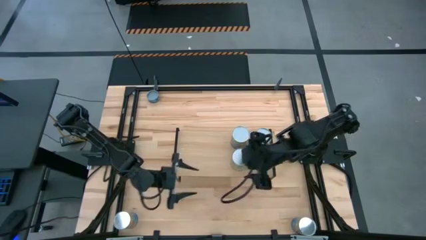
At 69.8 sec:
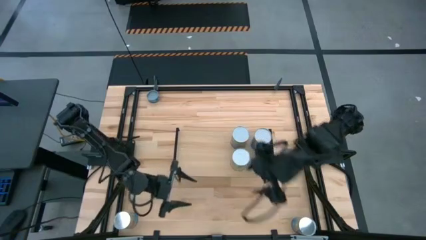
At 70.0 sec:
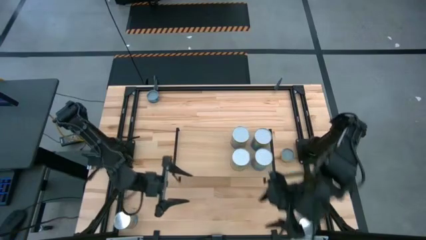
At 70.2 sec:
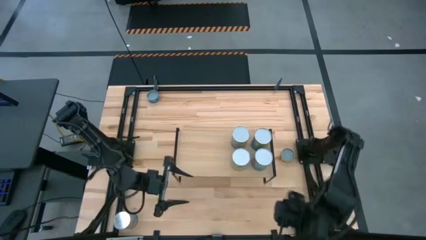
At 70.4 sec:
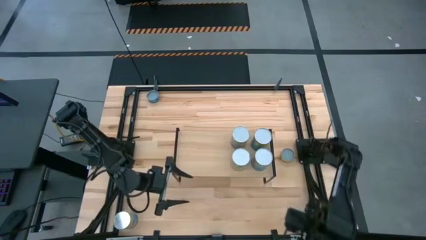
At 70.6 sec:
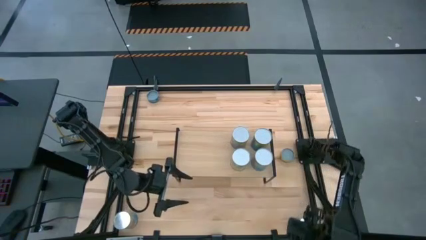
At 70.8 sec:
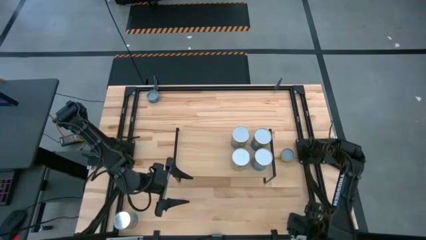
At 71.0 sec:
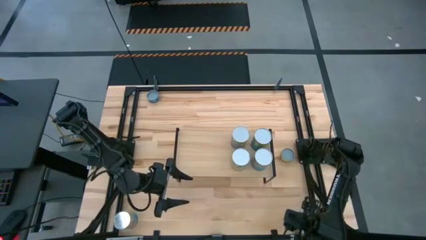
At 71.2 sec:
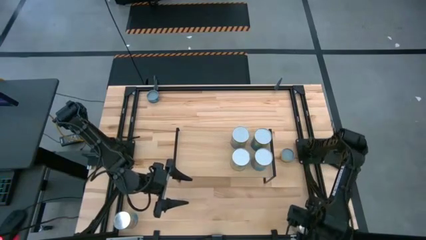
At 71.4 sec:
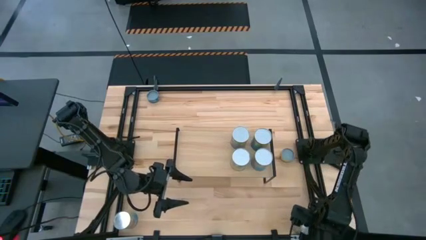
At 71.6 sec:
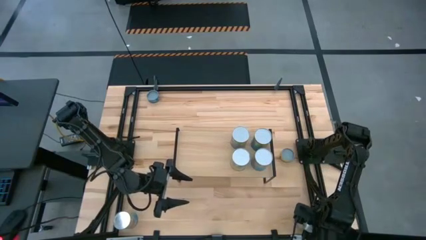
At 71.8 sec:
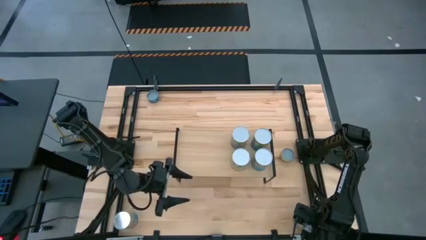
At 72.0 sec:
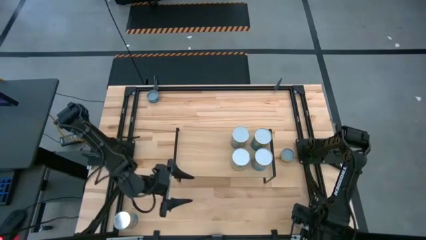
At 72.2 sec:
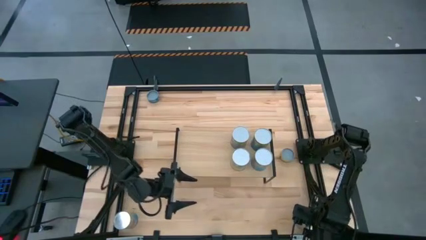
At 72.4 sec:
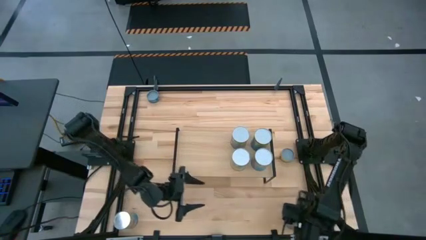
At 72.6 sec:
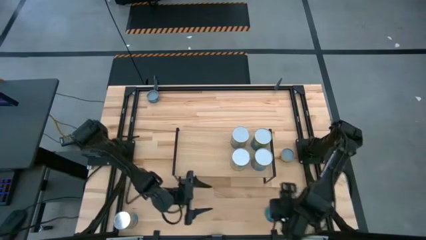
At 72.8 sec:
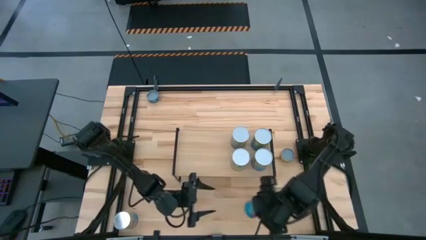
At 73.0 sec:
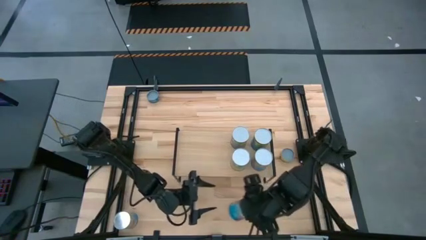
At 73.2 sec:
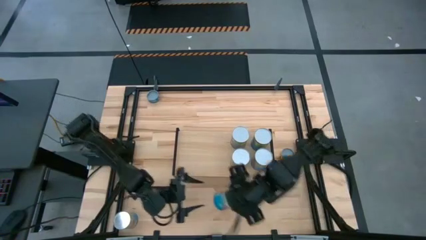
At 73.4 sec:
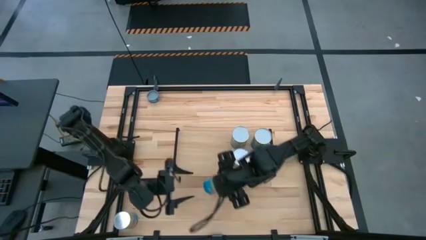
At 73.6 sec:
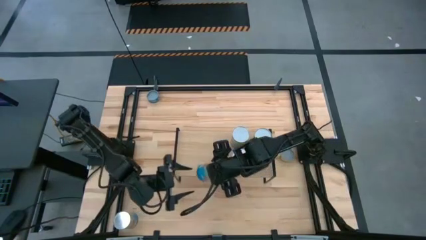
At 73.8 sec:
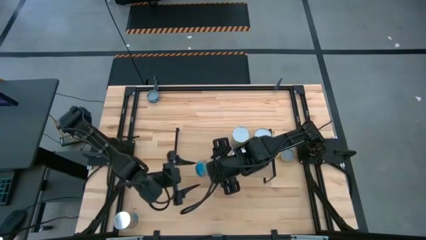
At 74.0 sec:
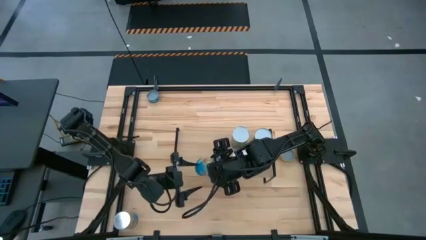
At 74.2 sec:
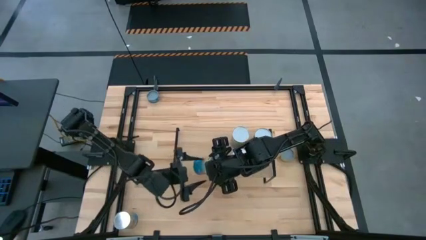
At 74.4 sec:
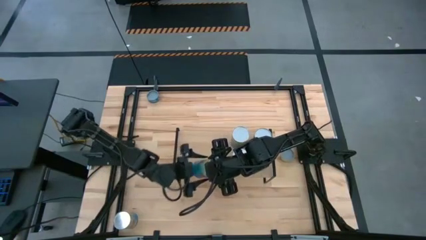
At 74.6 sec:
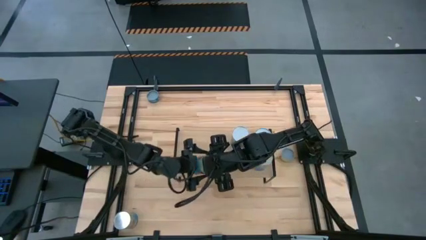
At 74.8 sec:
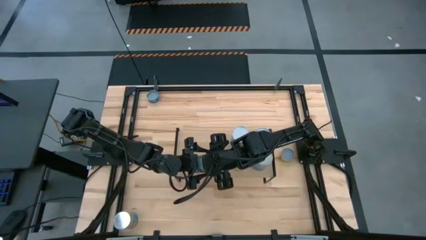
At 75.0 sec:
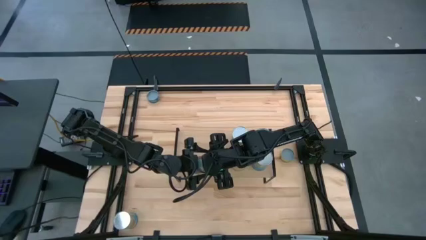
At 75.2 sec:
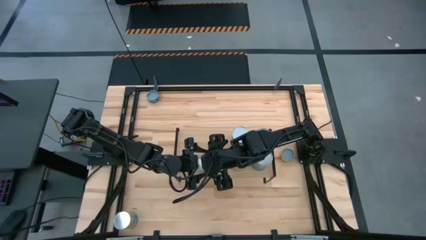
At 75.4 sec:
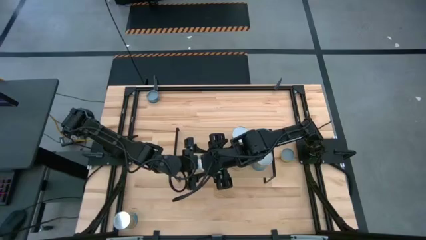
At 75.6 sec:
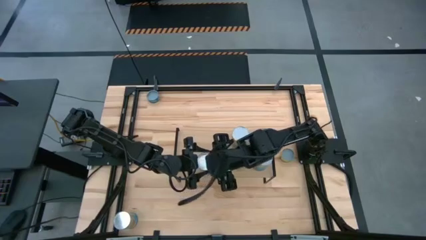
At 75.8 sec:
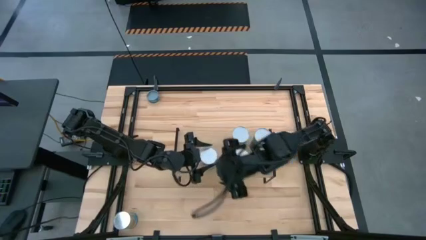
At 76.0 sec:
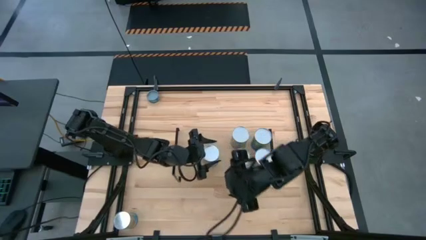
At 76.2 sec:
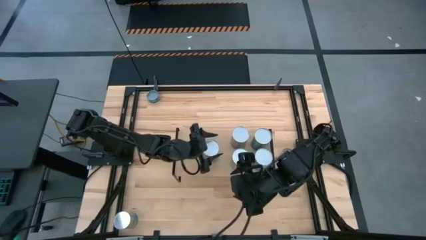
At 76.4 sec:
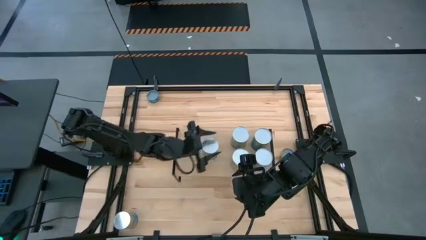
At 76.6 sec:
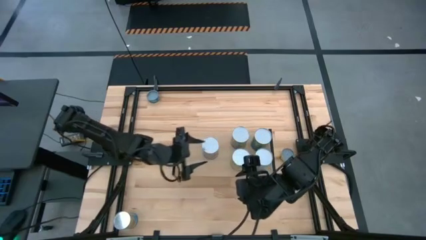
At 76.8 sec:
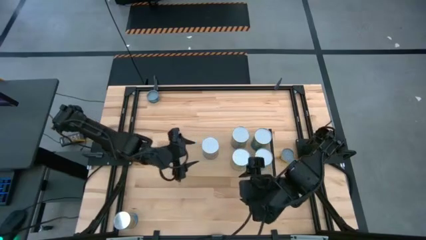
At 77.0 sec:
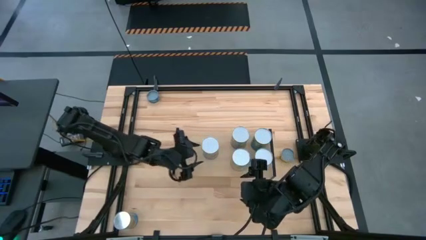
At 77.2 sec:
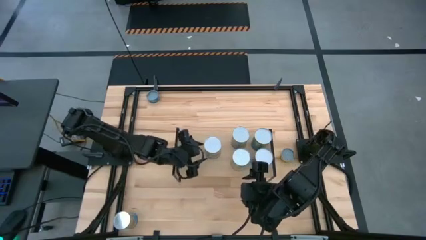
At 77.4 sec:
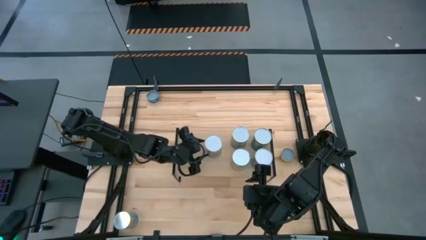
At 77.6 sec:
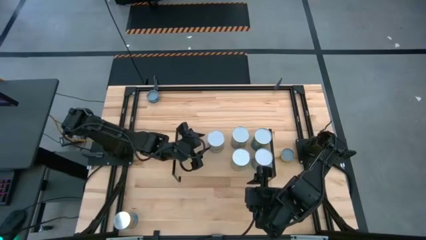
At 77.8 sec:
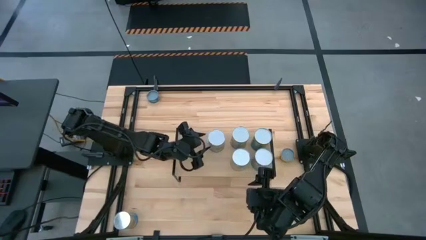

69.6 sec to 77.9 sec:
Task: Pick and place cans onto a shelf
Put the right canned tomatoes on the shelf

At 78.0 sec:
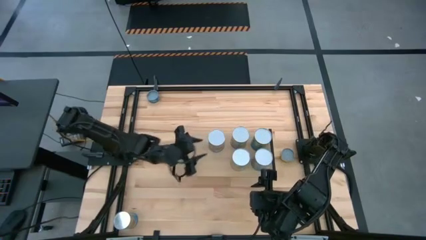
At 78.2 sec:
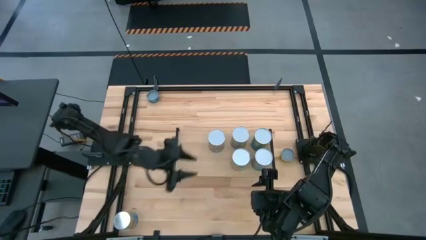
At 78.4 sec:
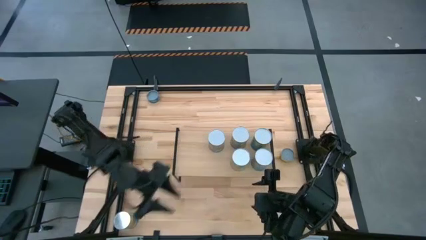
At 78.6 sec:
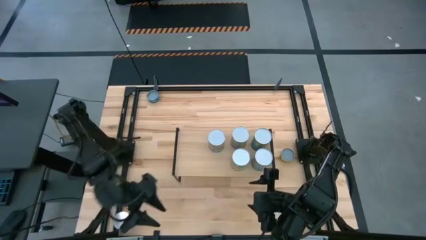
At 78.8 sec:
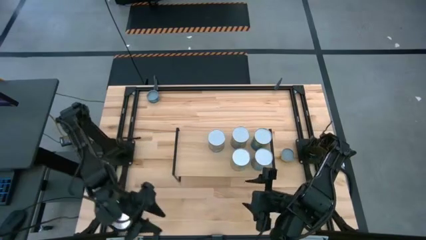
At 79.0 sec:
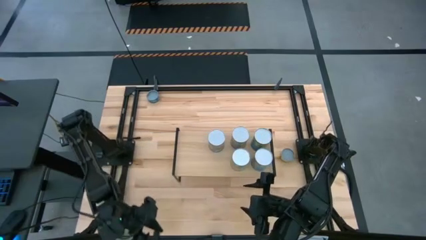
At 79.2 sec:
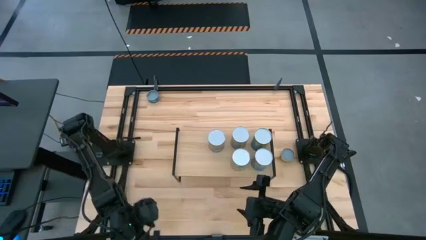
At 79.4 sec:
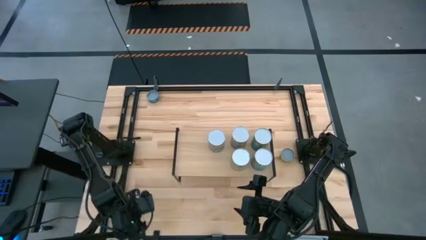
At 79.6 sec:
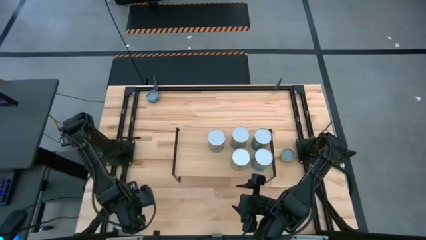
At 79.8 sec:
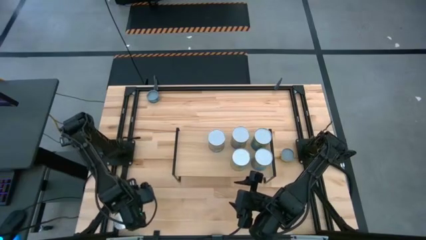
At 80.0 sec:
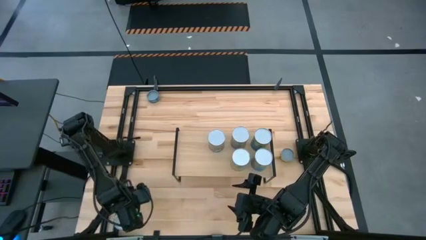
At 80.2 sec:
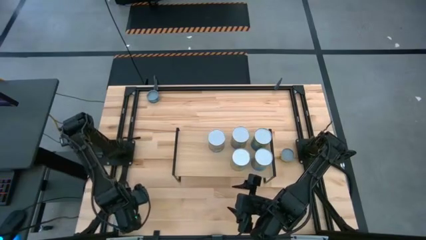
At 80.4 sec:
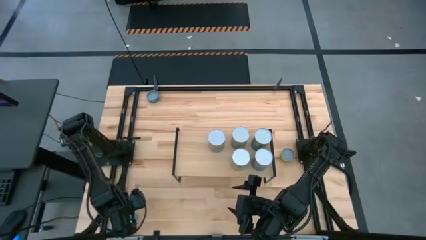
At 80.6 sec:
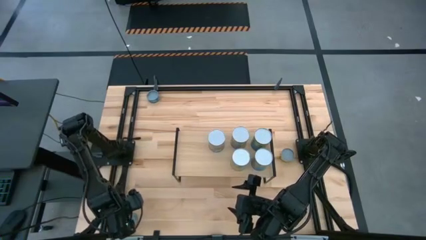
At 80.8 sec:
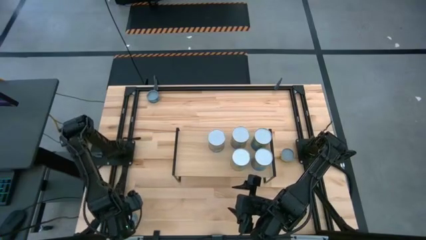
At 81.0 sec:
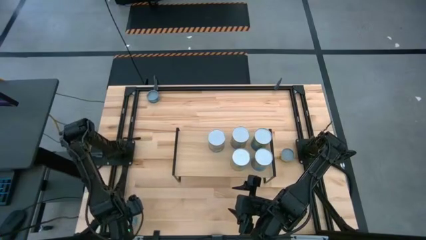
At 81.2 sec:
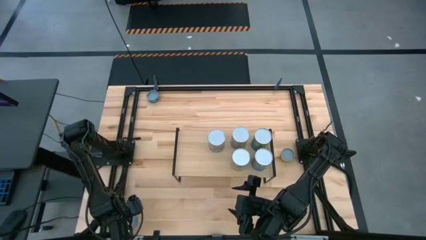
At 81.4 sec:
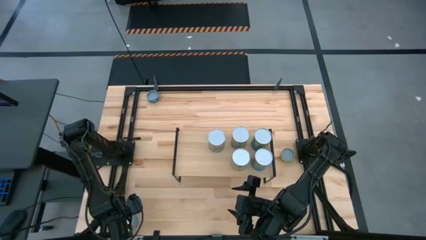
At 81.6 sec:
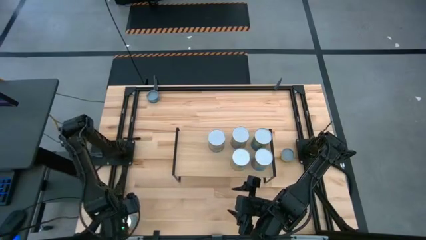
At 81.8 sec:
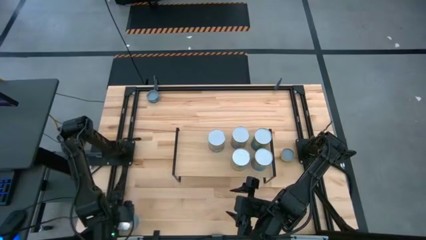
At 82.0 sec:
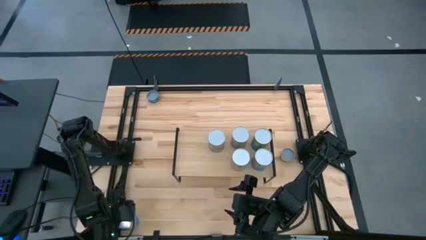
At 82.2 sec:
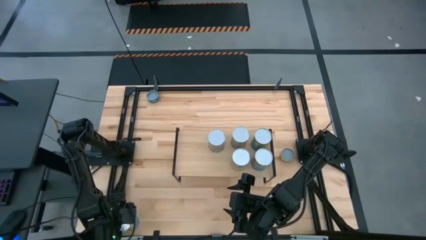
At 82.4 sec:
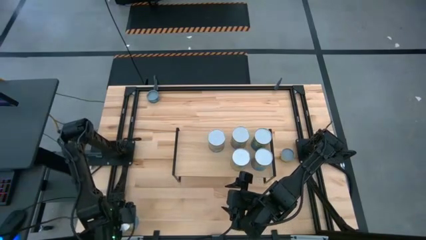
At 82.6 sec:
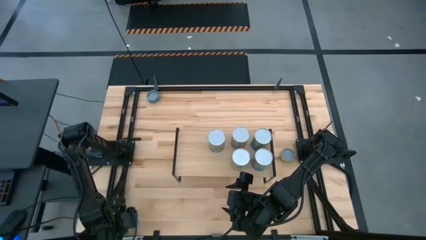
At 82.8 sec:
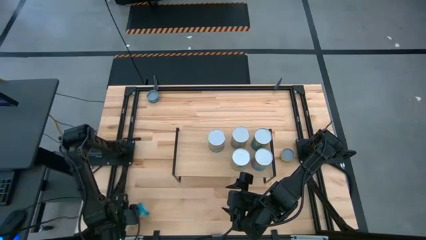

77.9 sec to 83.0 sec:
Put the canned tomatoes on the shelf aligned with the other canned tomatoes

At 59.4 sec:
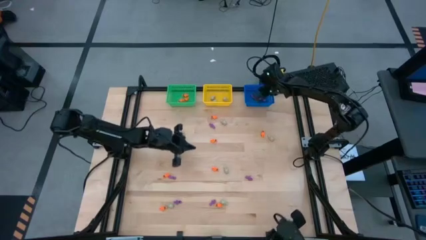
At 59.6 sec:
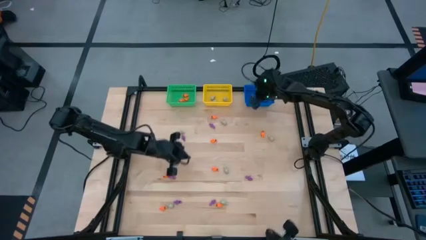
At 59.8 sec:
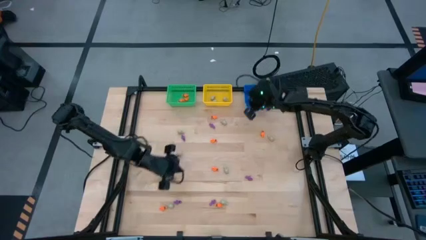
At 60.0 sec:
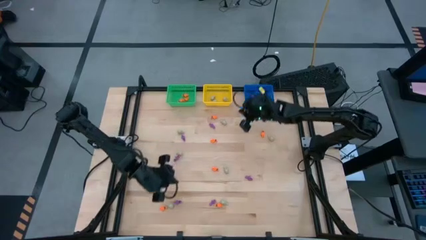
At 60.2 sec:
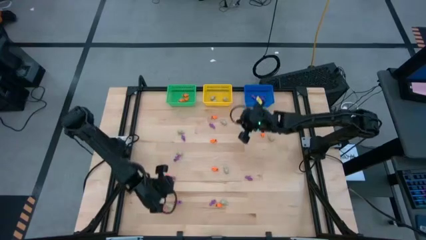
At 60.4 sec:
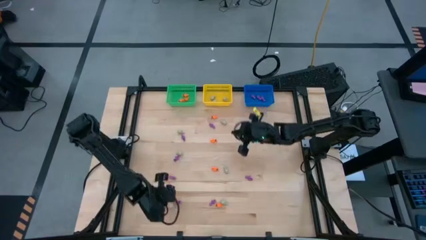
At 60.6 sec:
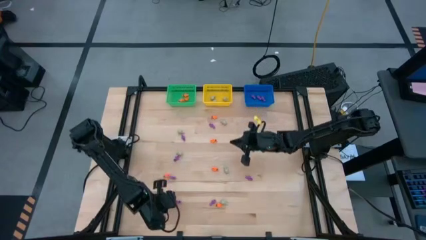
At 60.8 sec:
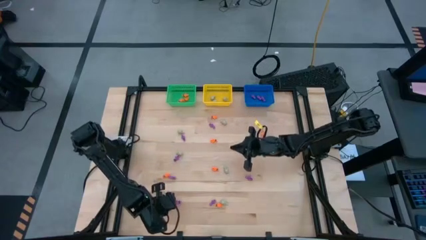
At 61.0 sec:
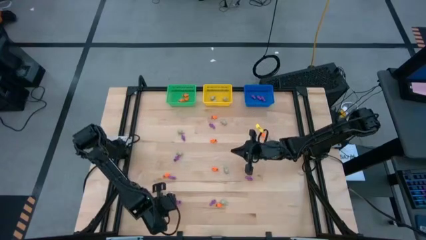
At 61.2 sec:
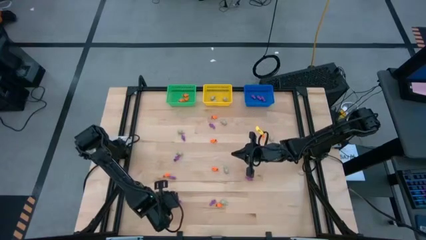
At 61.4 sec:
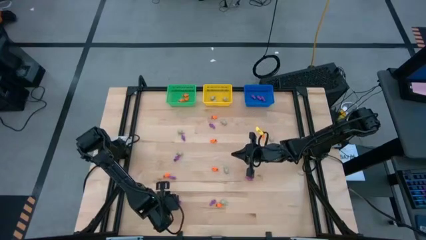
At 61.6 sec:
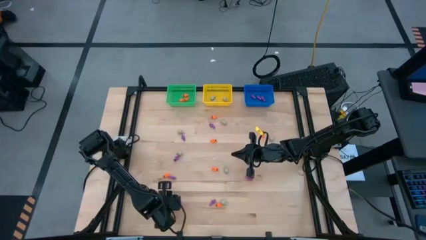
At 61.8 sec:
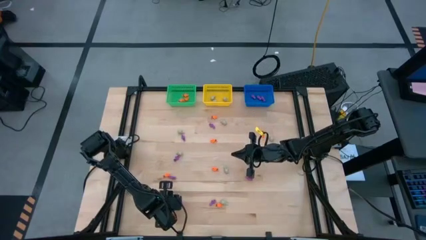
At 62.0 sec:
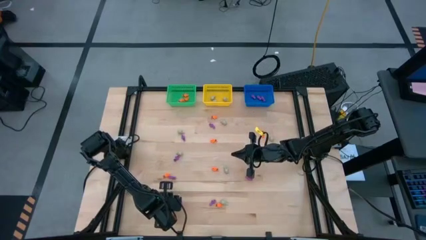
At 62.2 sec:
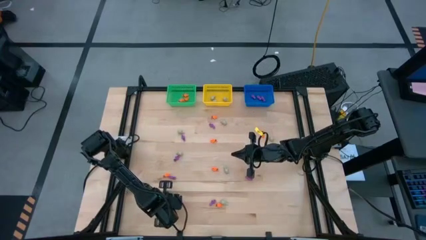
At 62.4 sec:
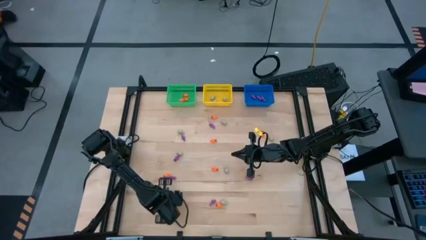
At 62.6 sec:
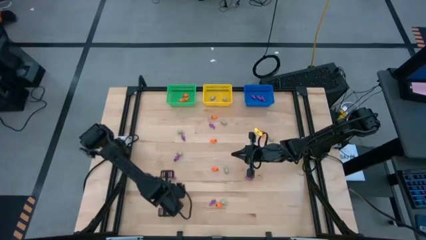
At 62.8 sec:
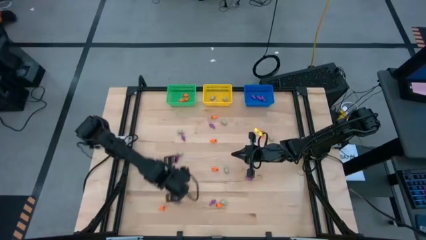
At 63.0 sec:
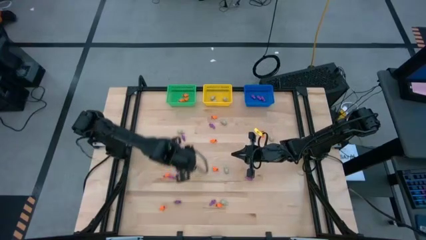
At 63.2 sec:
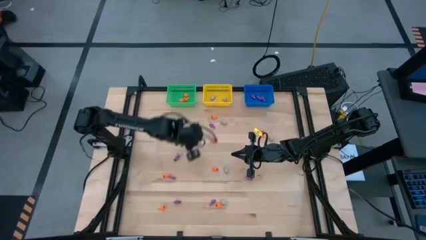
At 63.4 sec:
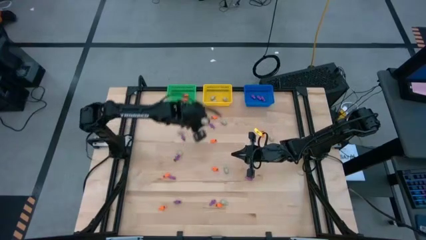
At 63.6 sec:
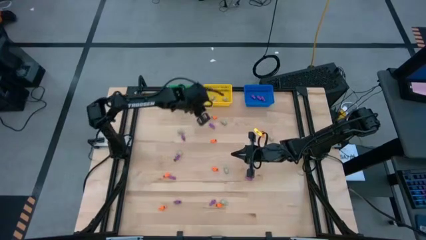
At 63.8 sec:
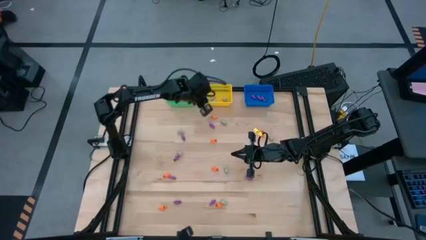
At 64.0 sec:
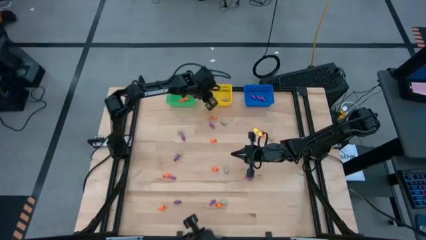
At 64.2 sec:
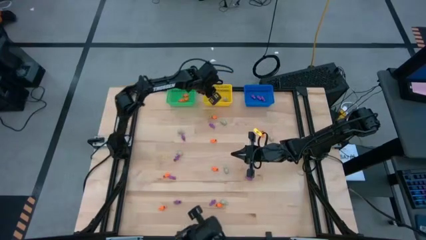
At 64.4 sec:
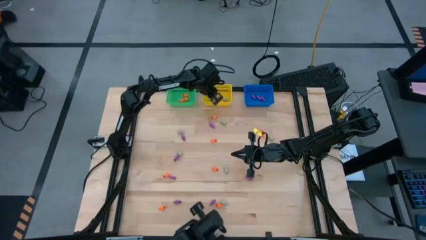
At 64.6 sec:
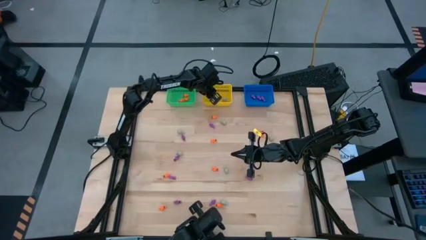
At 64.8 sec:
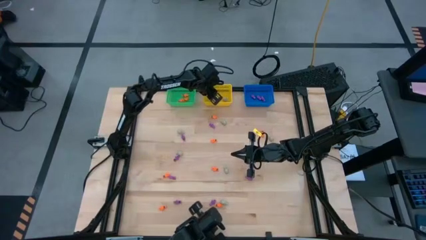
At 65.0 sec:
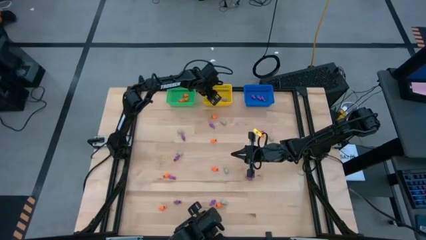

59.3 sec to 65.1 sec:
Task: Sort Halloween decoration
Put the white skull toy into the yellow bin
